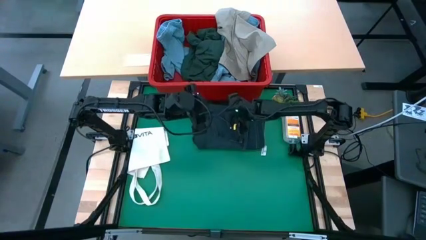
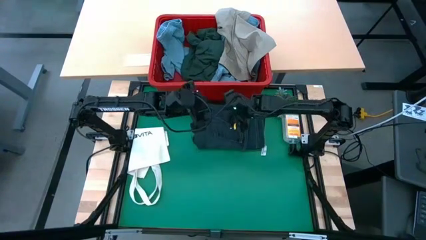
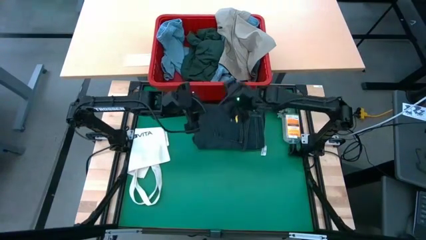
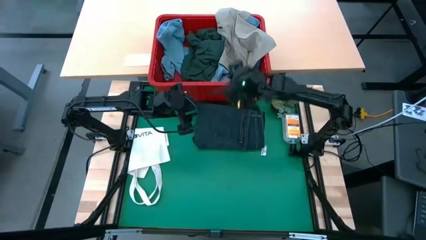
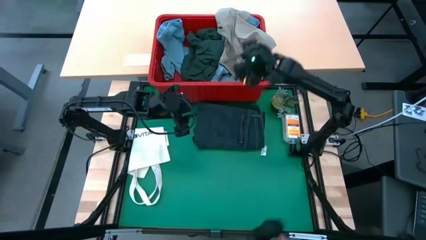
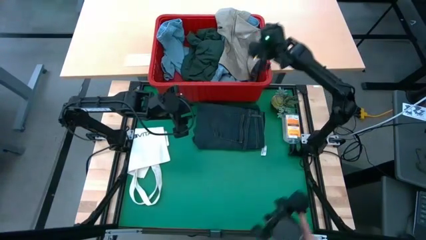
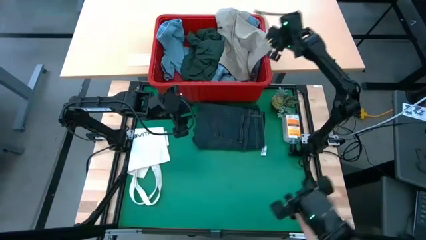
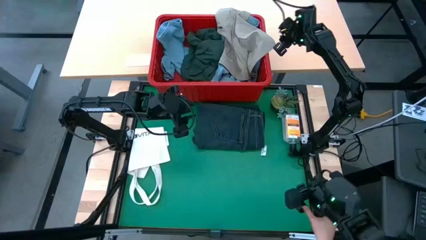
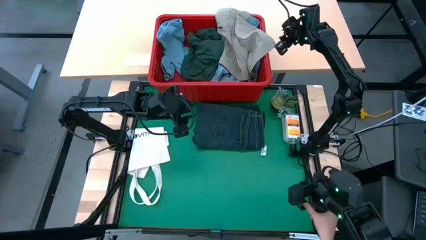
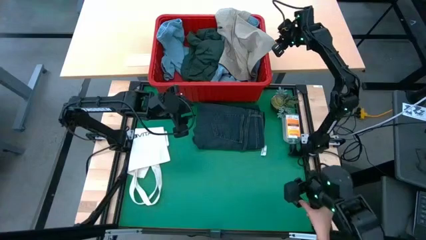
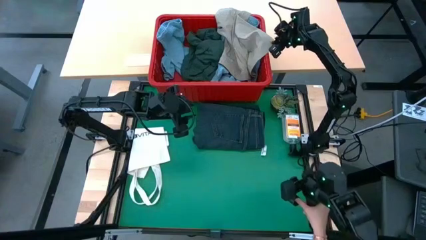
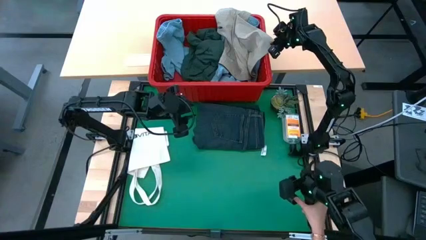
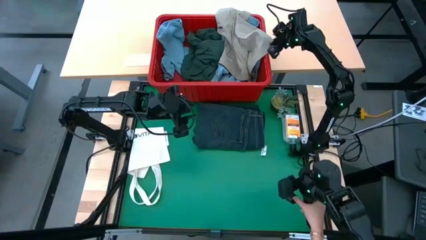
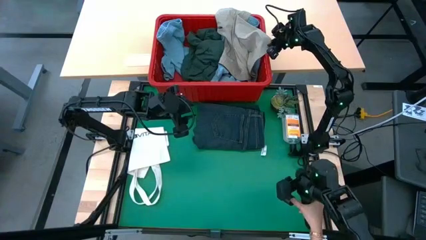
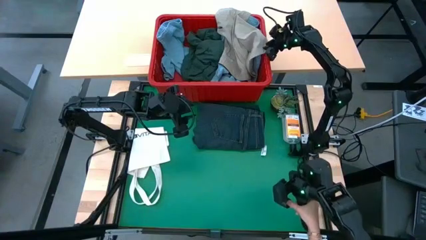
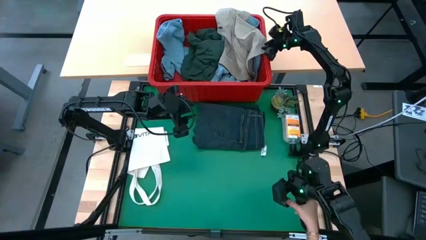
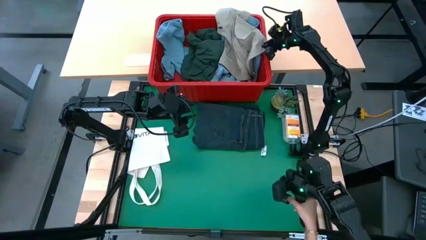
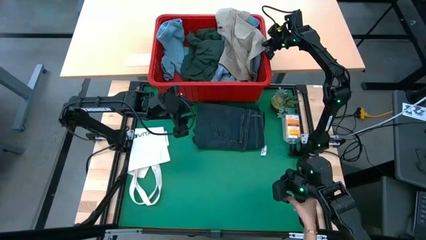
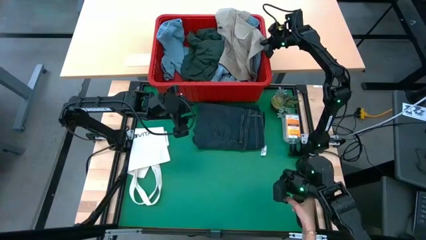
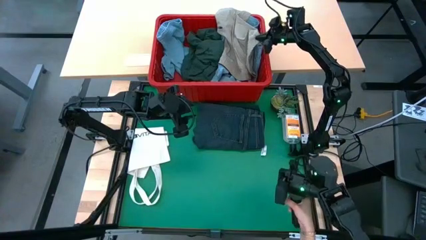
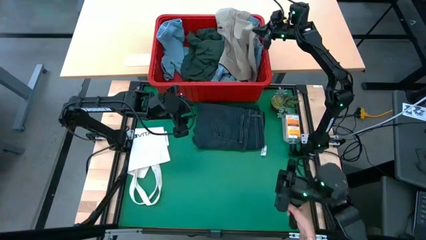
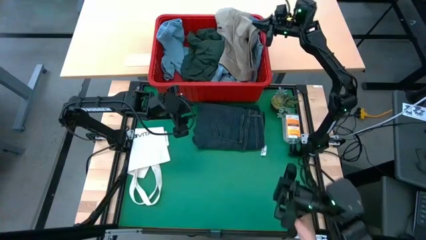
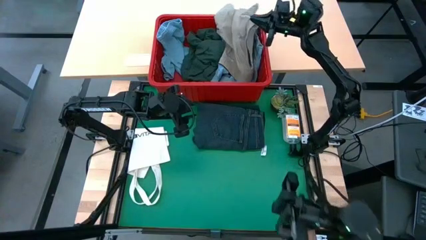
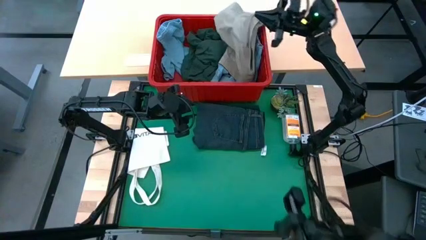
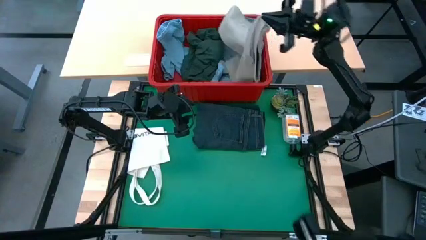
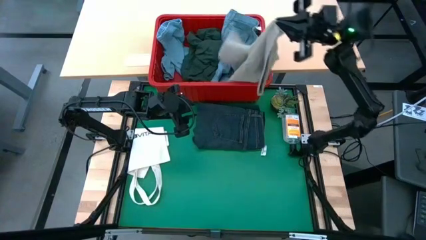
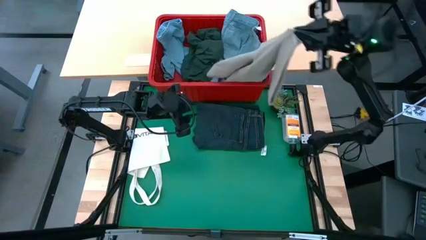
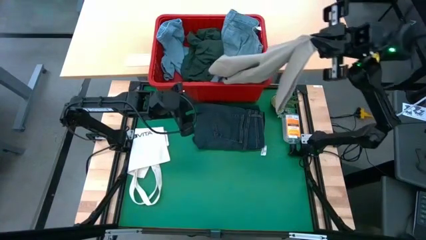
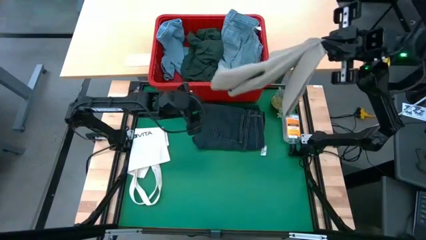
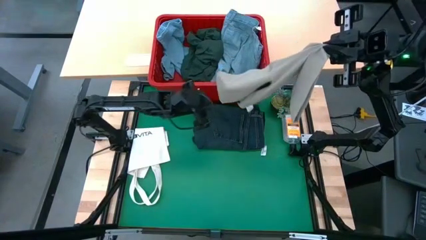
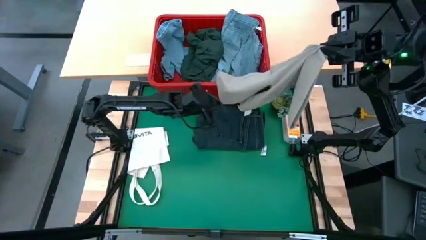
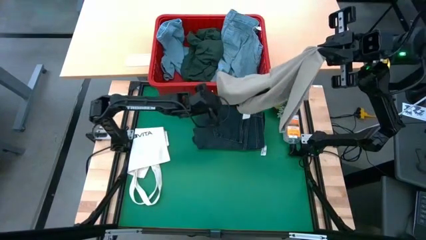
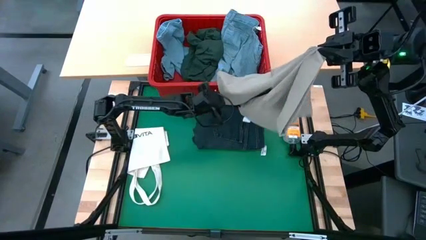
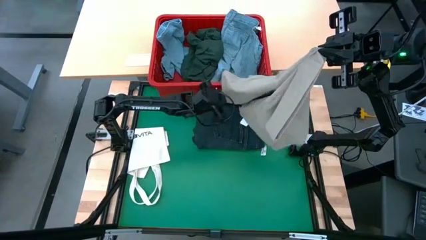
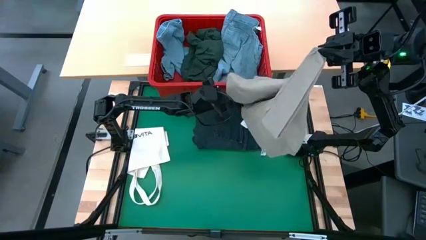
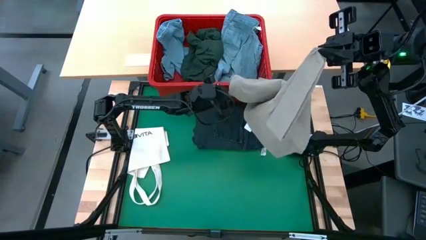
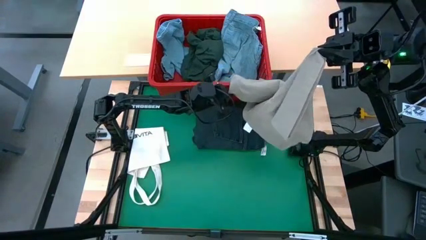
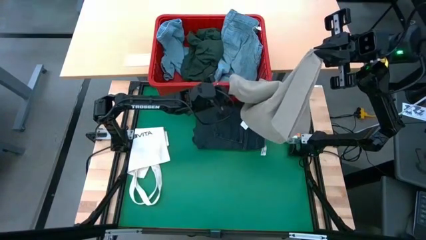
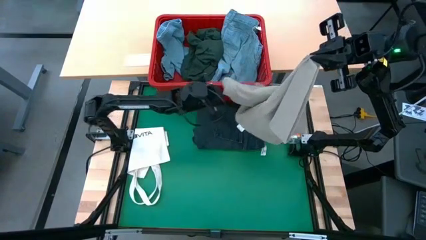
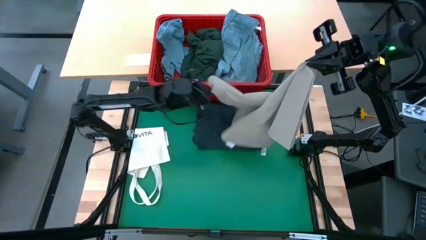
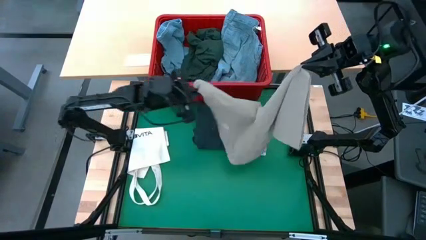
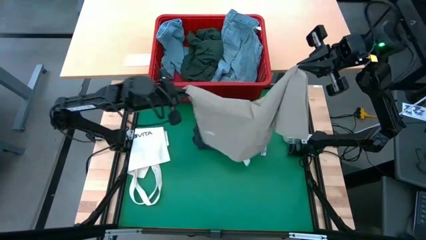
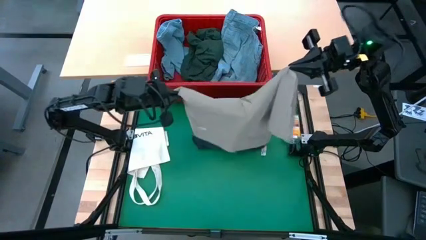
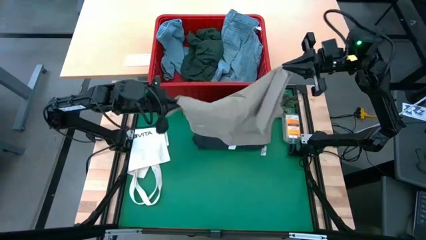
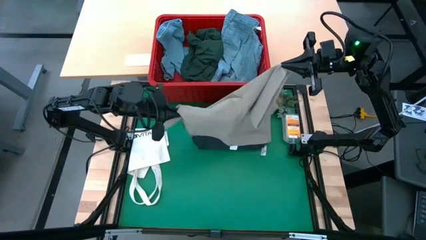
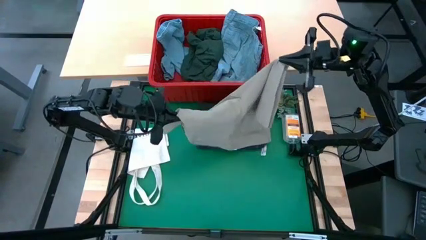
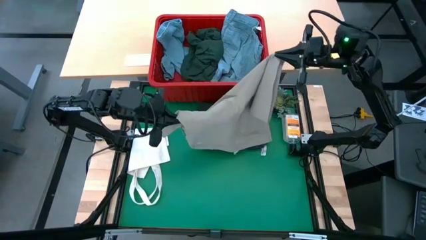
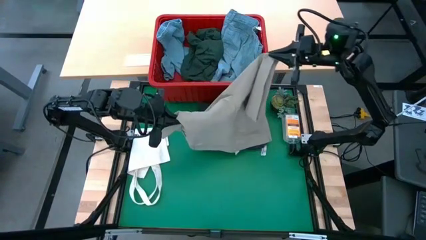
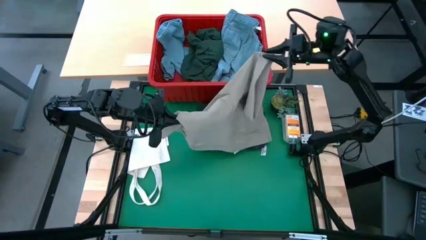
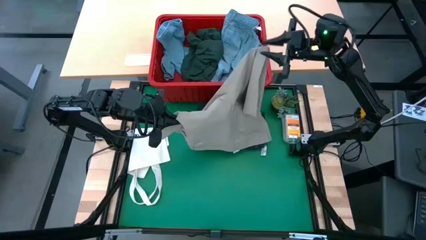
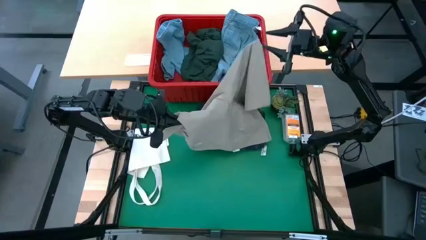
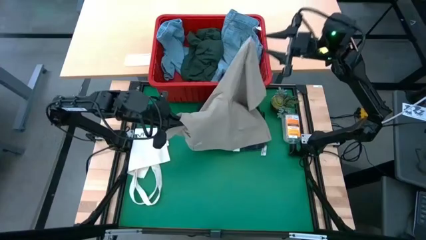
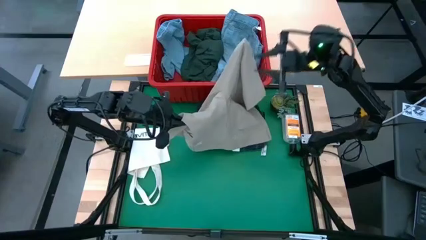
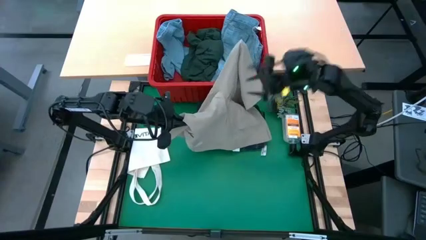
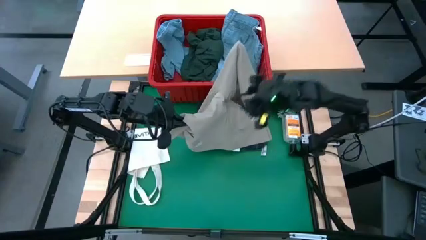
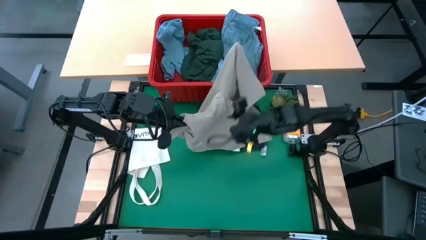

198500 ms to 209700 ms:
Task: Fold laundry
Remove the brown shorts from the laundry bin

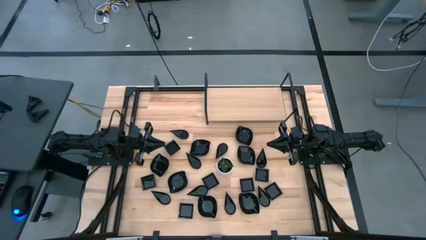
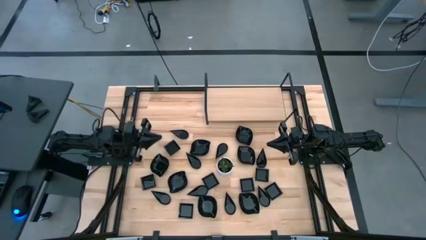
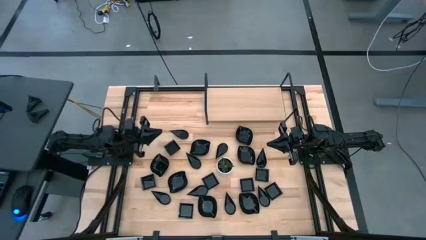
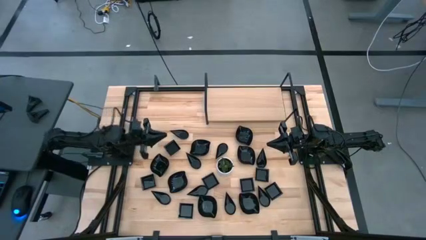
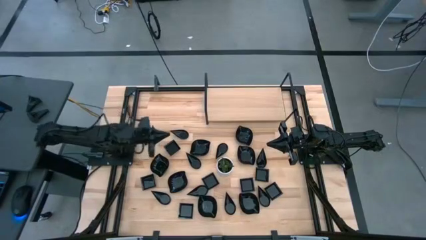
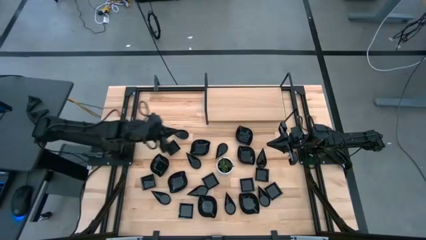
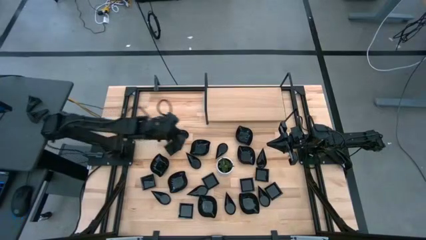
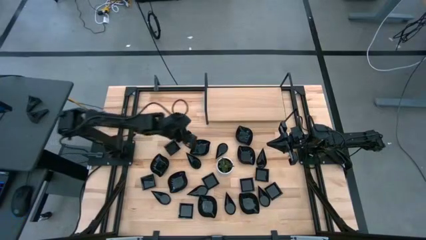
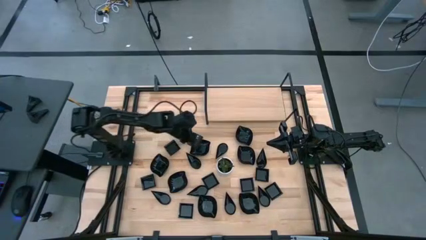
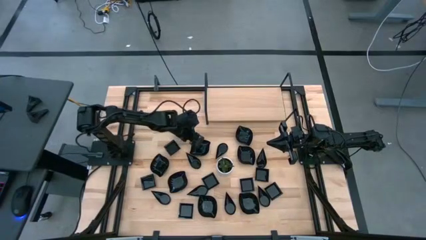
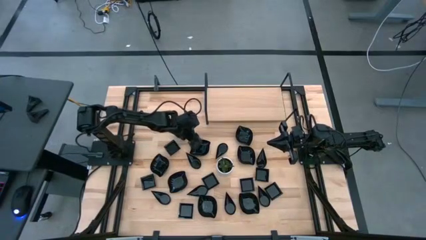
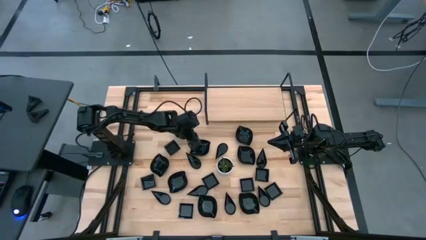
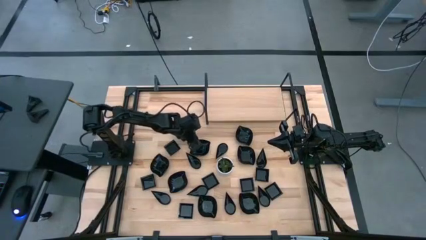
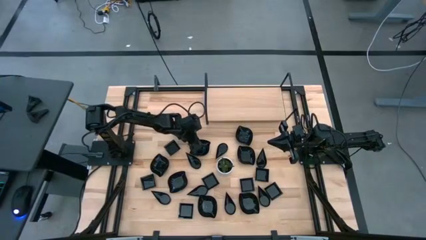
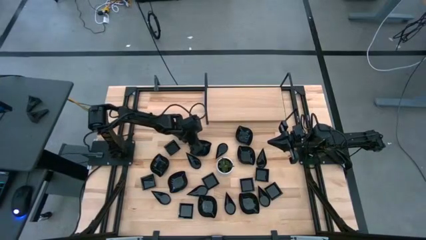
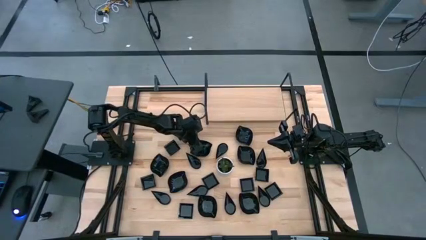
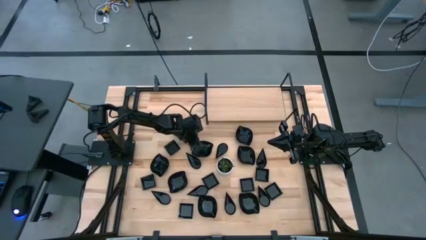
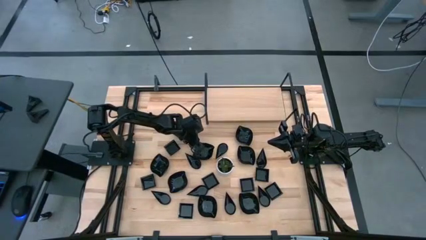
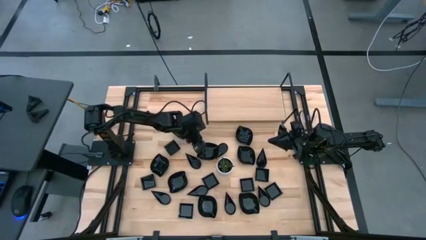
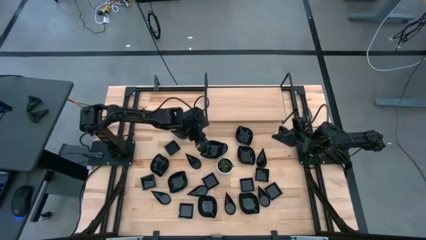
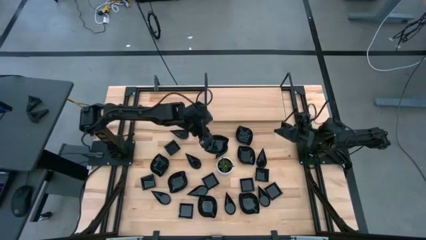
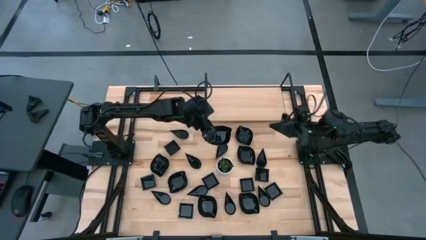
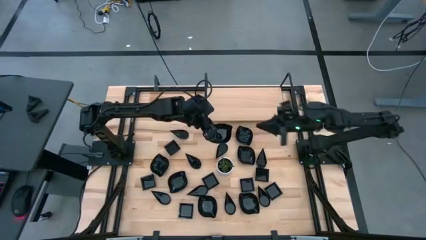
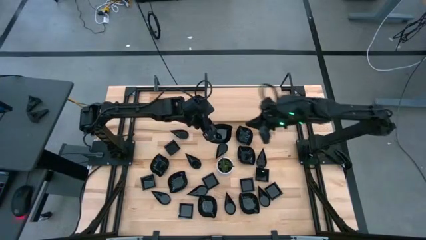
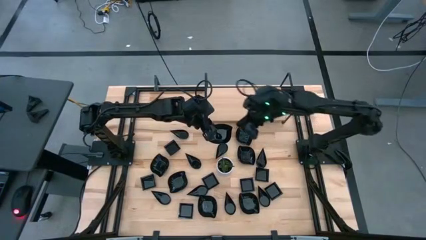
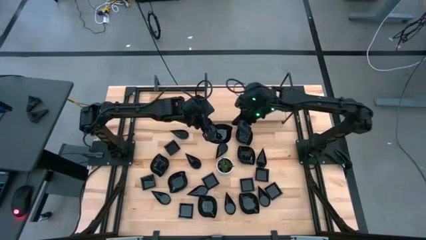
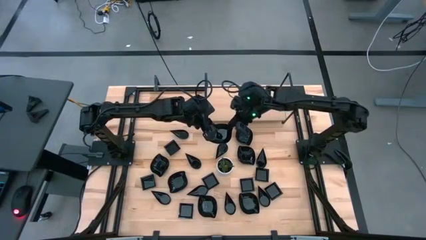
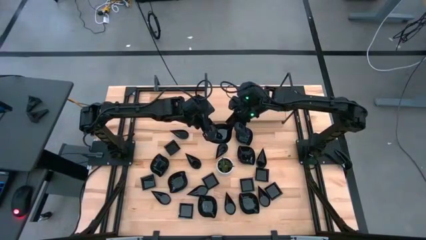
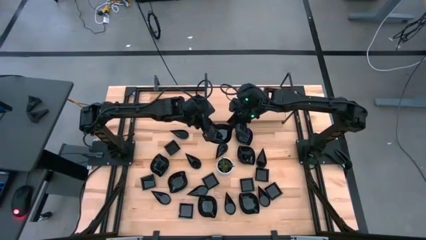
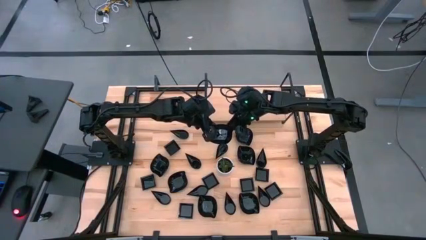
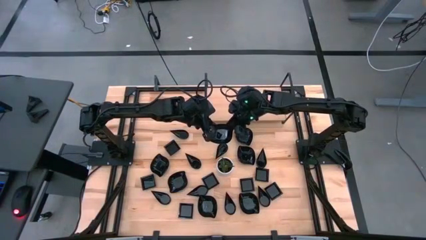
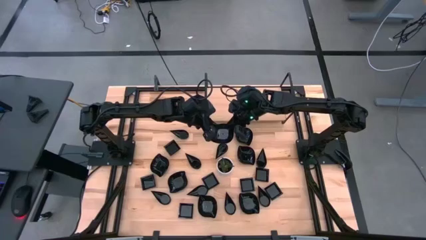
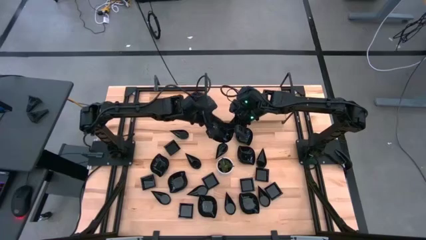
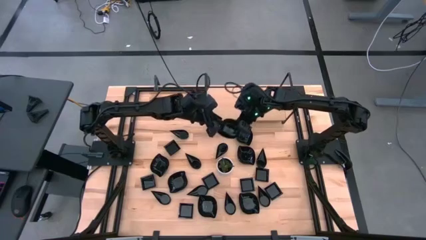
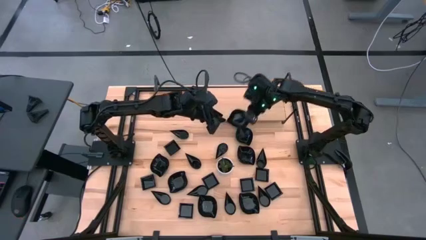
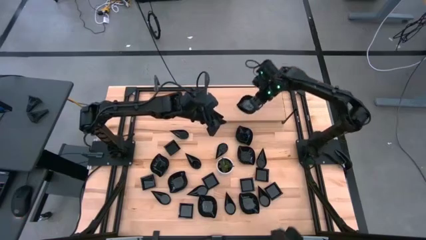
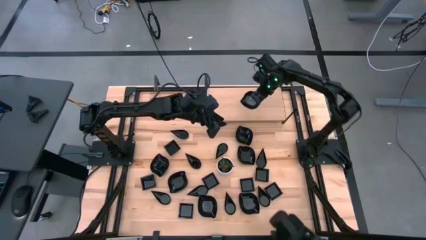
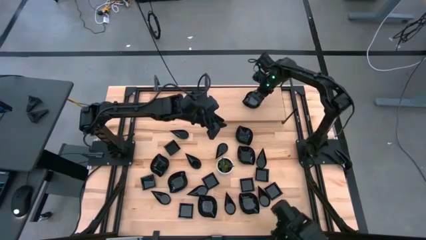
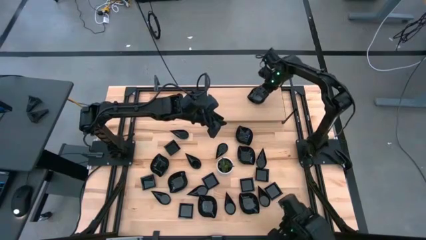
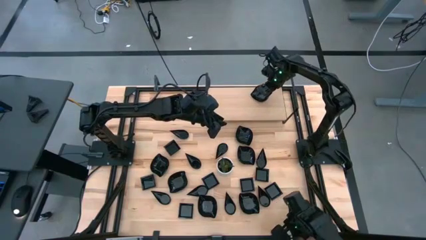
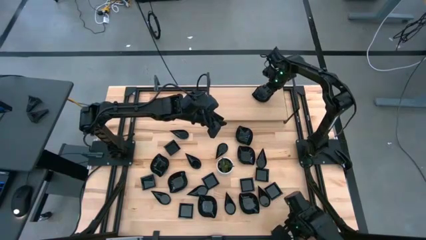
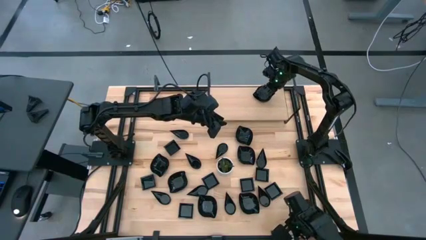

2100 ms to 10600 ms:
Task: Pick & Place Mini shaped plates
Put the leaf shaped plate on the shelf
